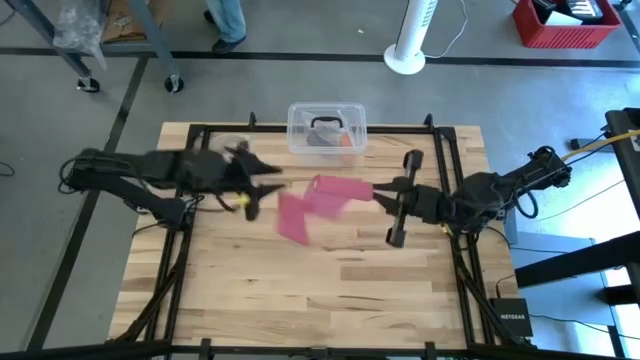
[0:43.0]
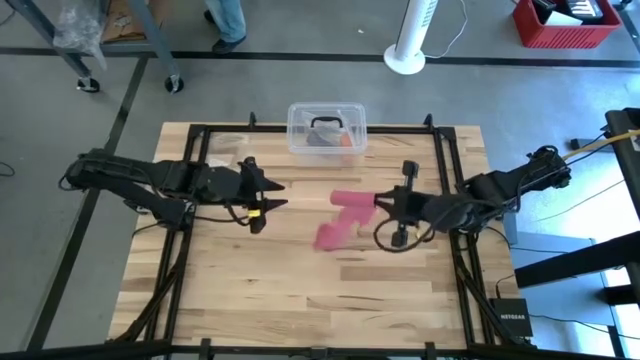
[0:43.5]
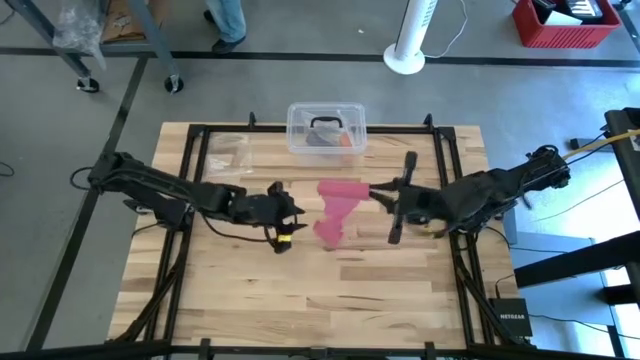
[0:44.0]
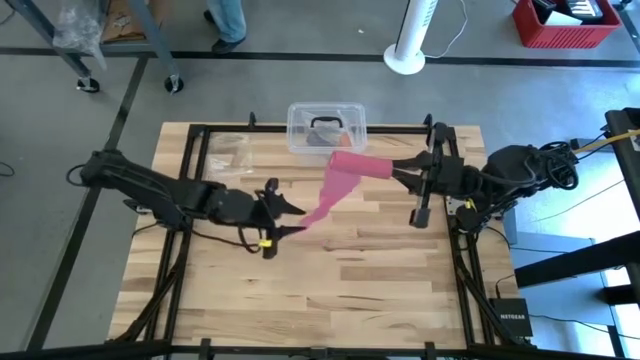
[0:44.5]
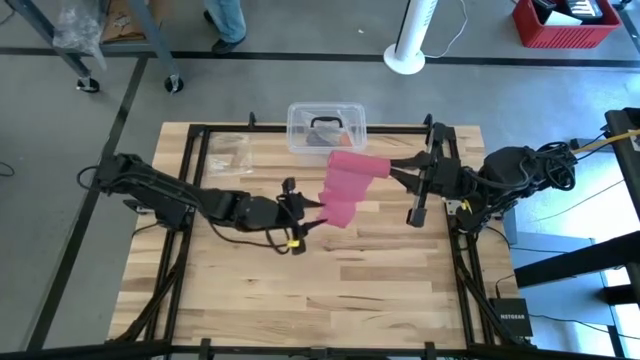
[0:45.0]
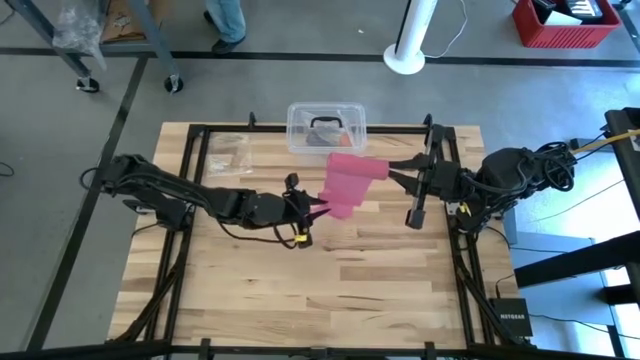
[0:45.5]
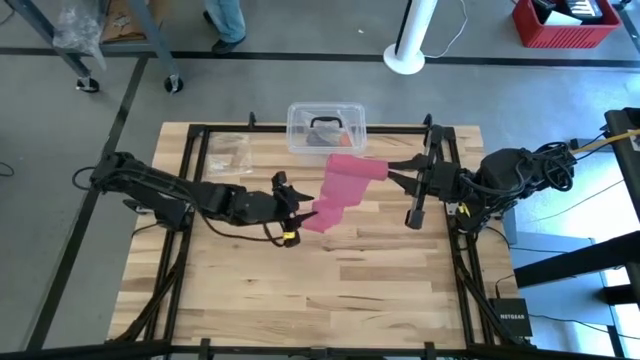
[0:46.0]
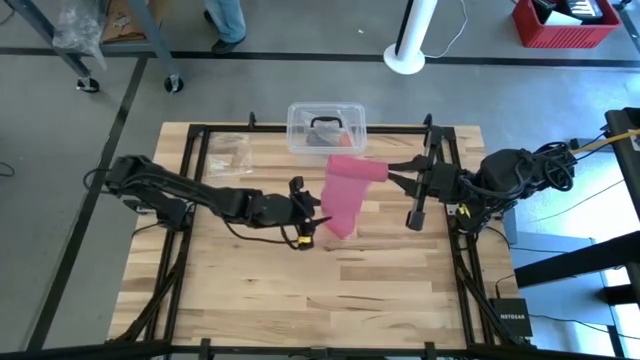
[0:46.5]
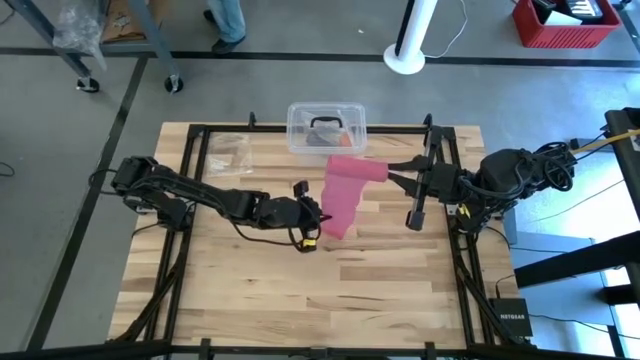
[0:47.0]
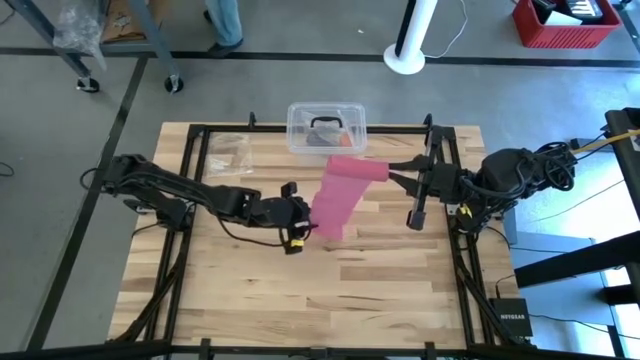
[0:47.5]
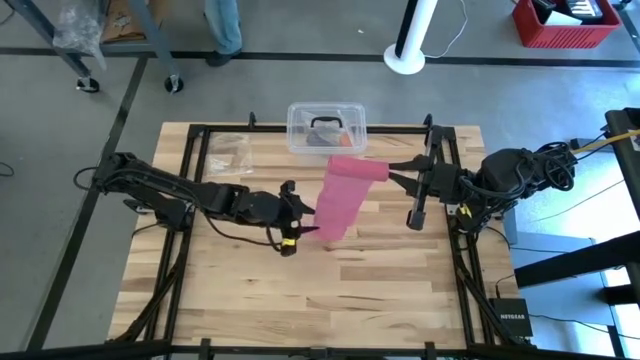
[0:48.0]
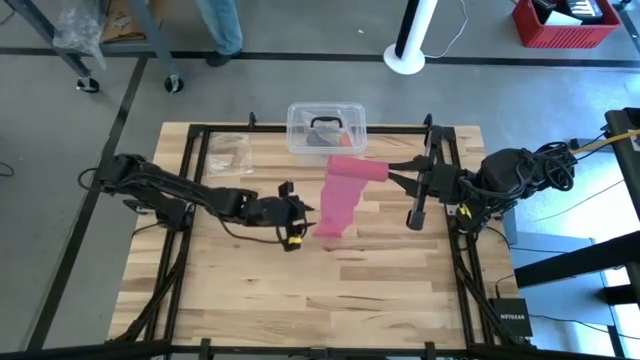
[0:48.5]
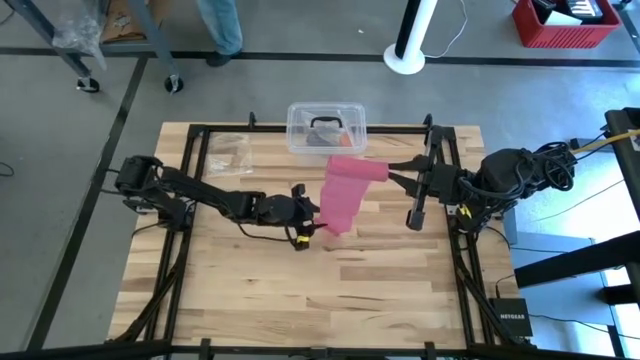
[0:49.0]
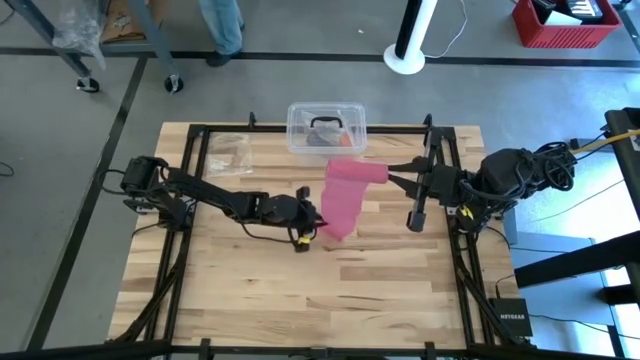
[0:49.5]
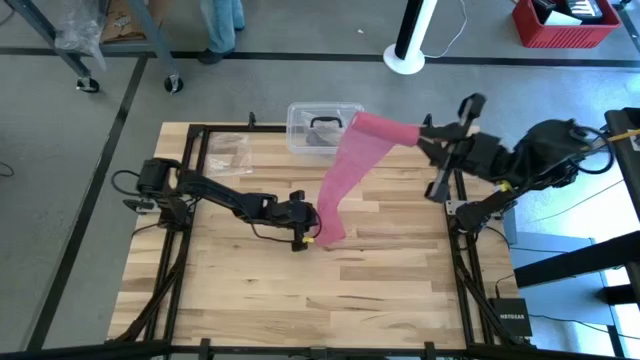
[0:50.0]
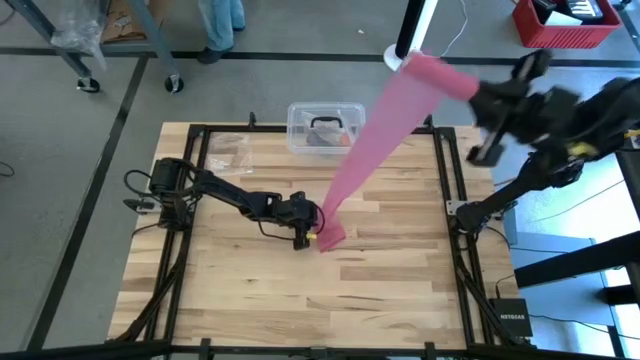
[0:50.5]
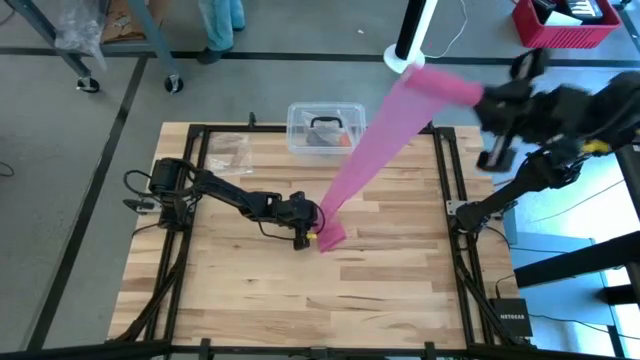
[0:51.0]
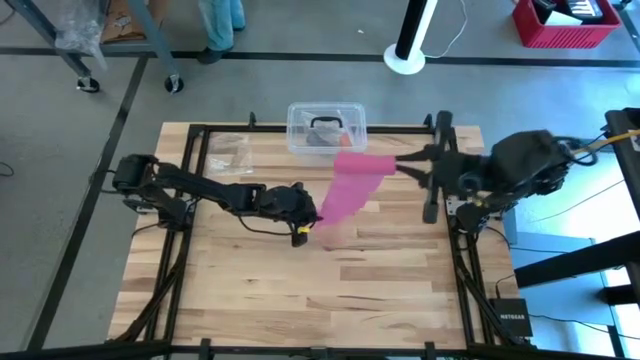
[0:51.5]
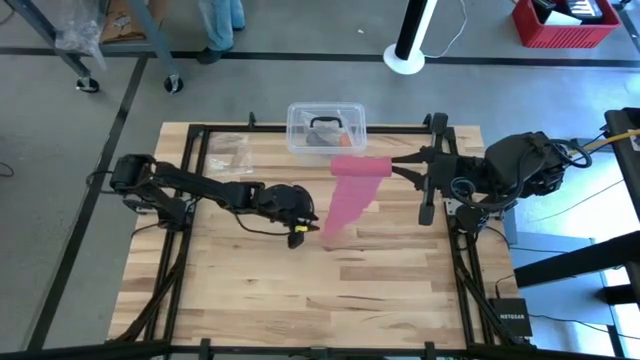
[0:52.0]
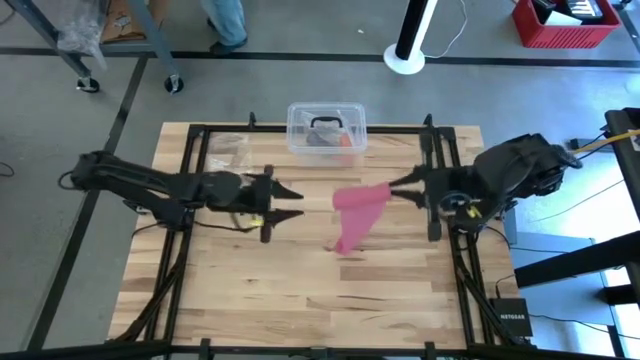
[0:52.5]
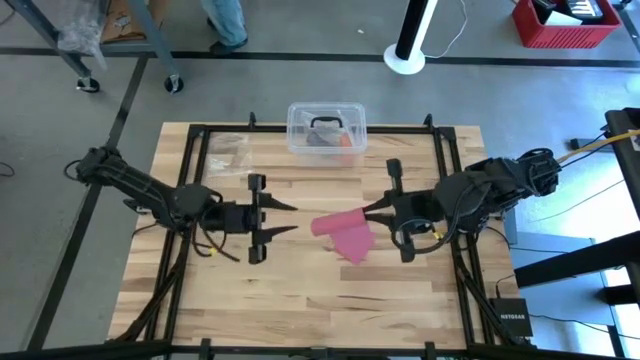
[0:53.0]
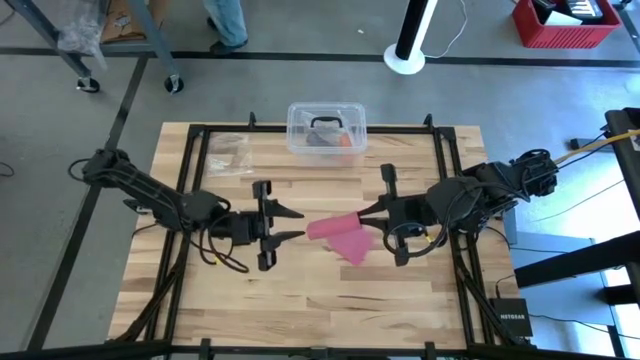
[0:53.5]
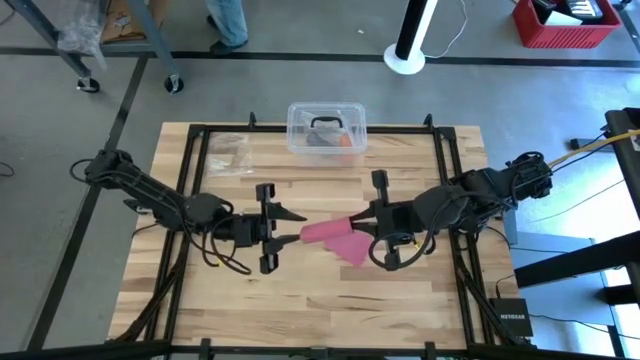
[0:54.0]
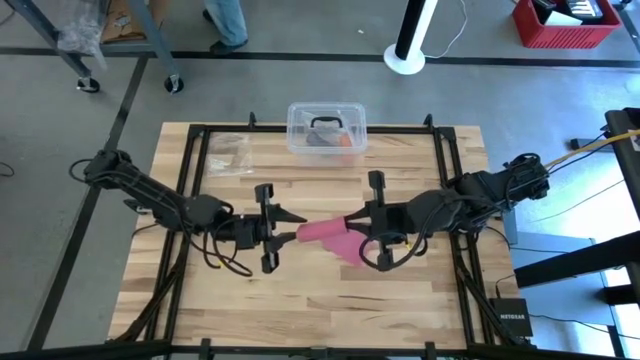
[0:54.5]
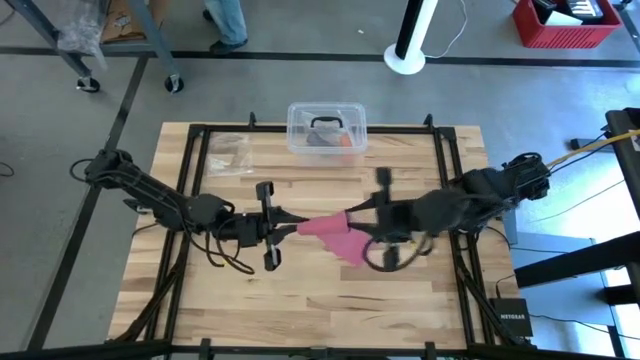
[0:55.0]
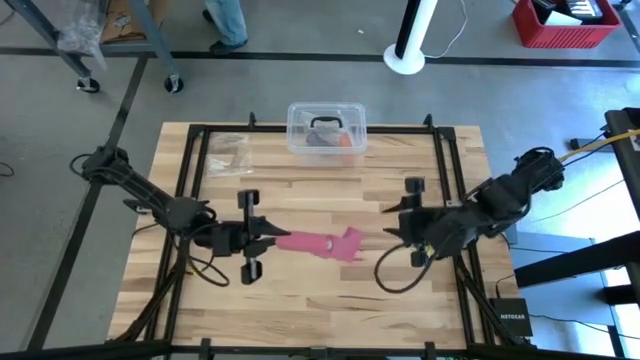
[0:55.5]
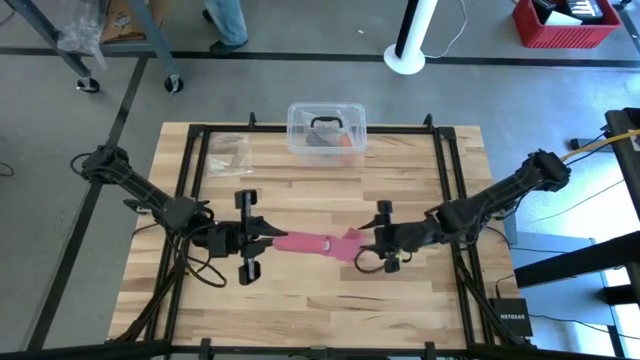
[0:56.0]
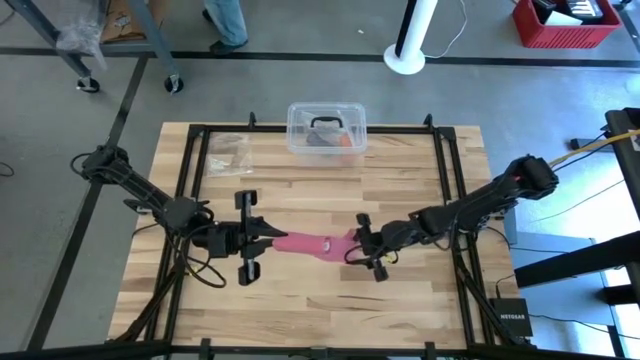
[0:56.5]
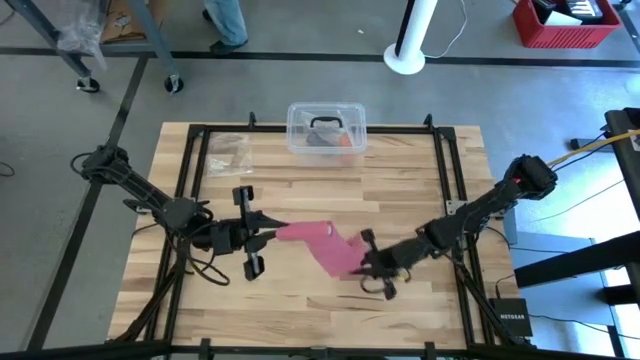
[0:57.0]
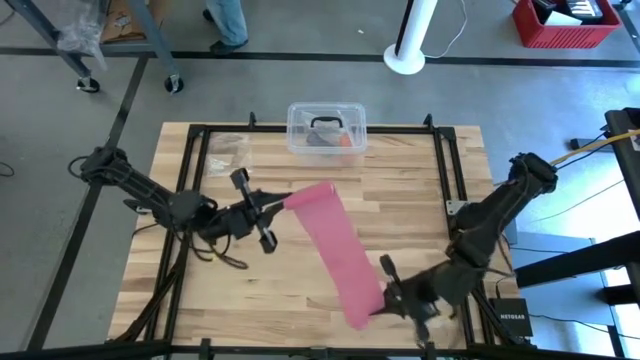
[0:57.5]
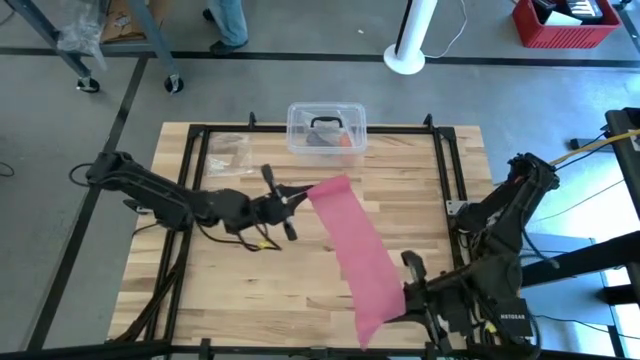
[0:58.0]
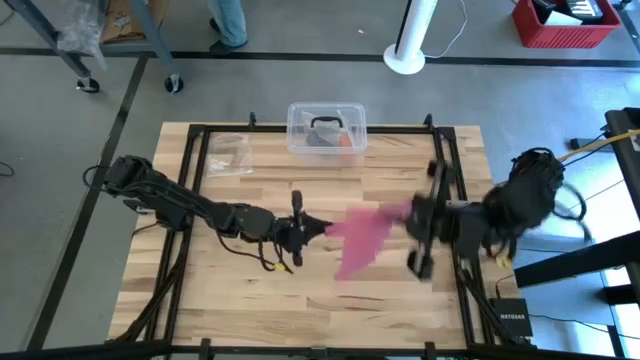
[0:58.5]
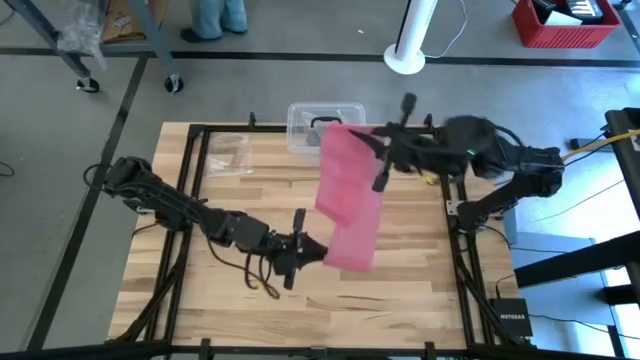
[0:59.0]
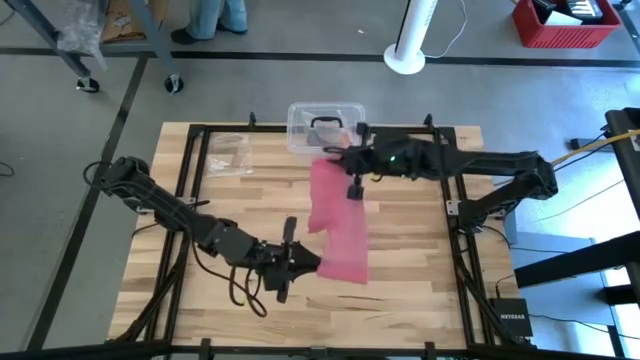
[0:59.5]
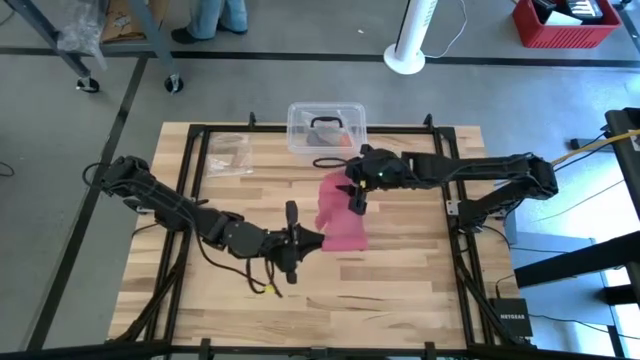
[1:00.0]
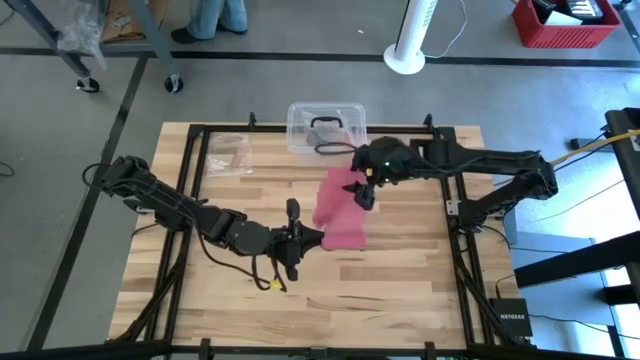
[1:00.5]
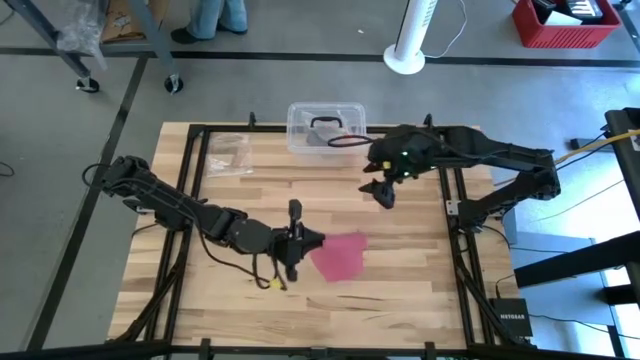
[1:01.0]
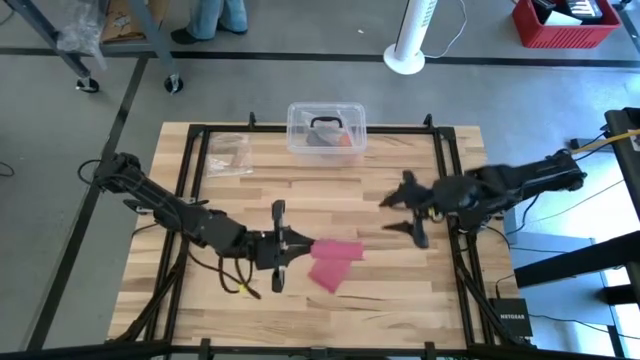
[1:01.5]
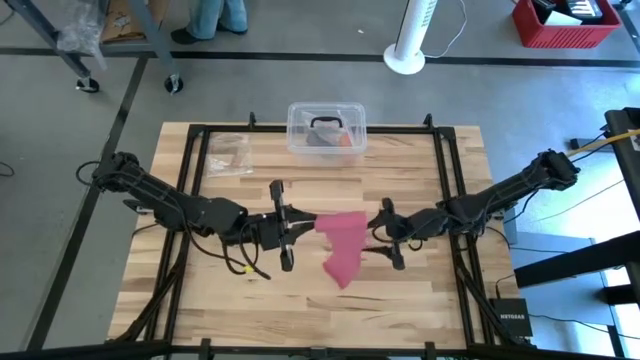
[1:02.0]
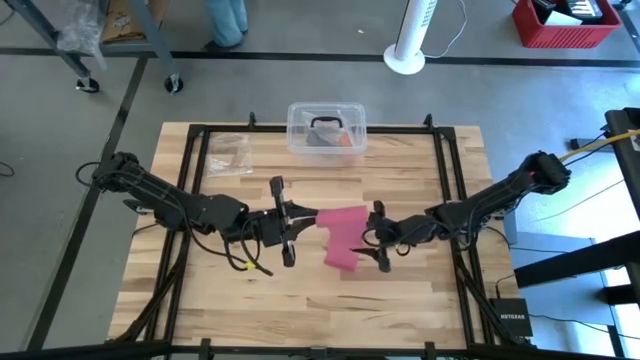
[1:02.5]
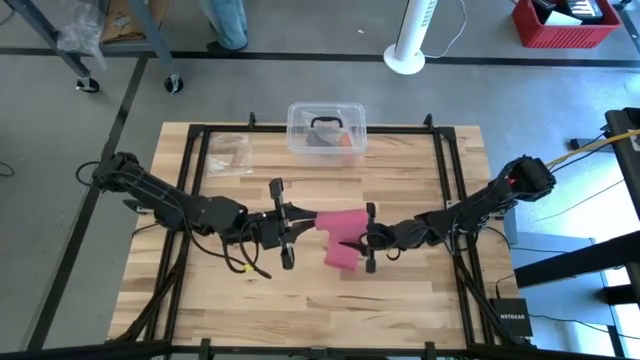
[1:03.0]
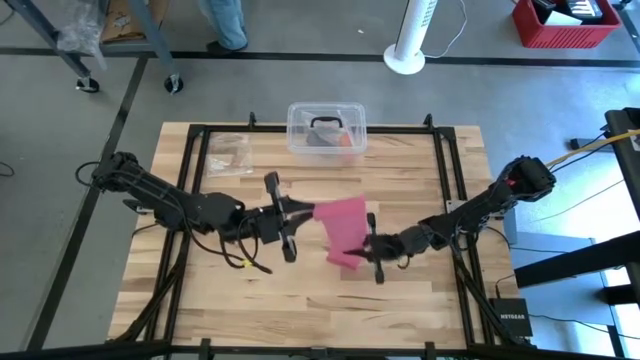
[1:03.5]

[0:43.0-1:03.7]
Task: Roll bandage
Roll the pink bandage
